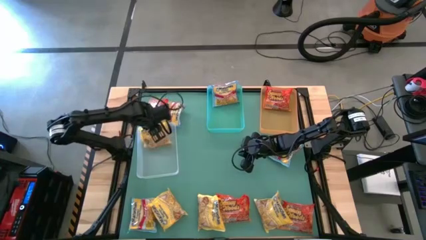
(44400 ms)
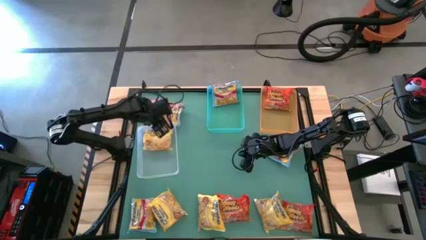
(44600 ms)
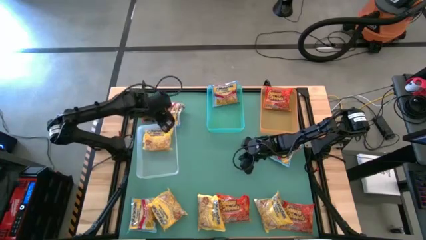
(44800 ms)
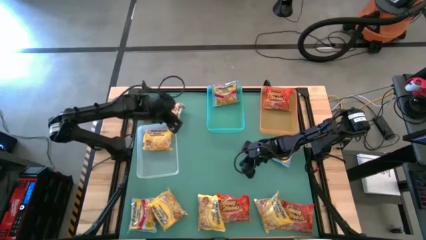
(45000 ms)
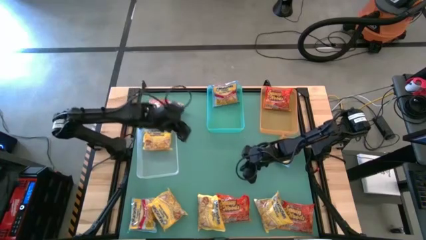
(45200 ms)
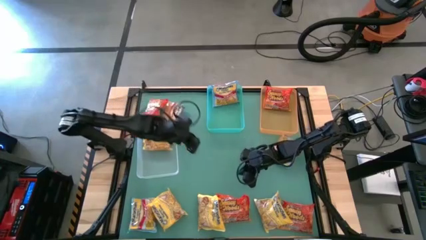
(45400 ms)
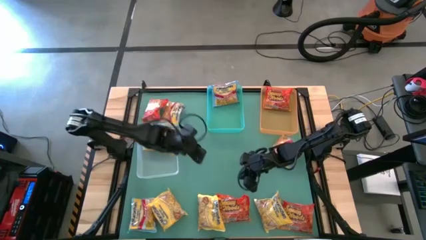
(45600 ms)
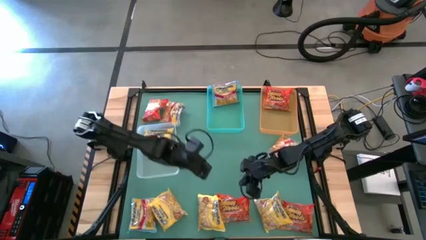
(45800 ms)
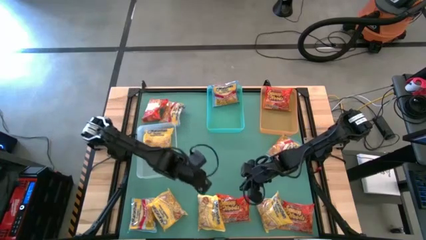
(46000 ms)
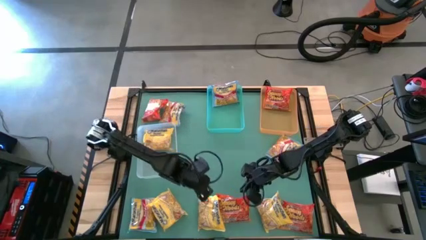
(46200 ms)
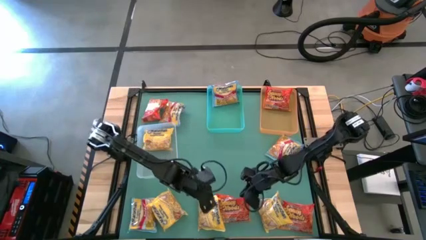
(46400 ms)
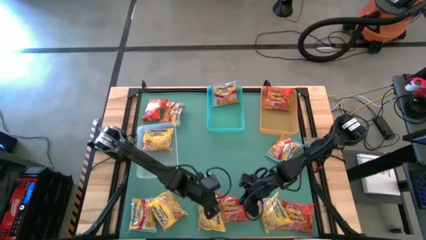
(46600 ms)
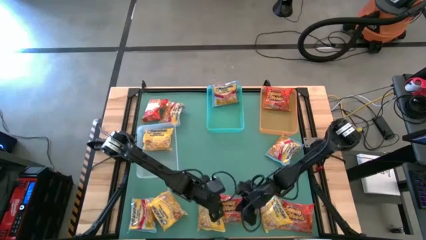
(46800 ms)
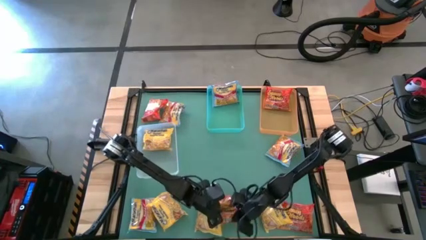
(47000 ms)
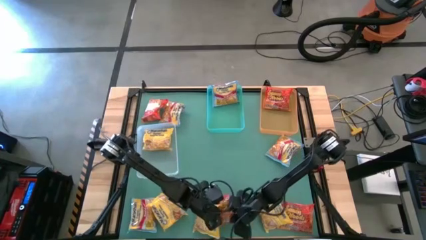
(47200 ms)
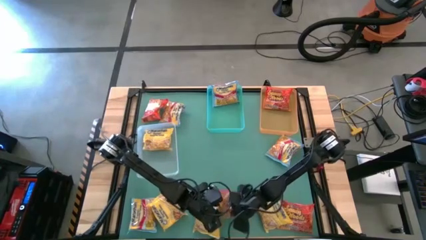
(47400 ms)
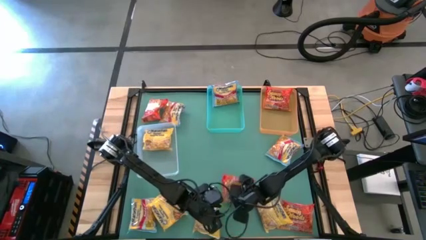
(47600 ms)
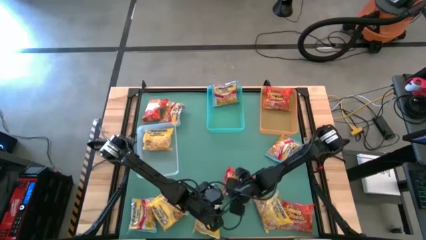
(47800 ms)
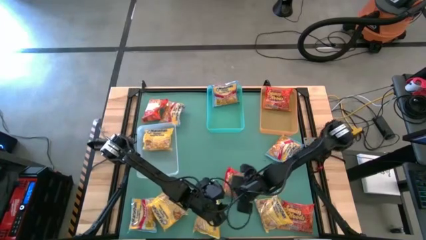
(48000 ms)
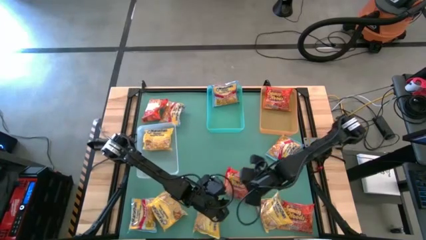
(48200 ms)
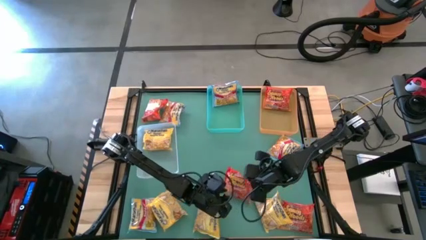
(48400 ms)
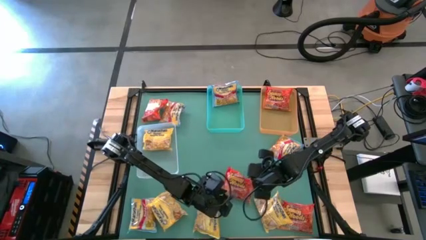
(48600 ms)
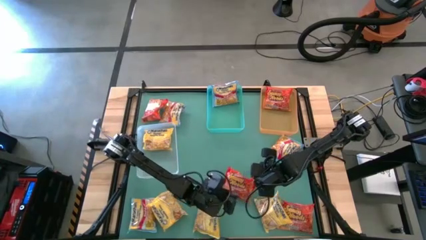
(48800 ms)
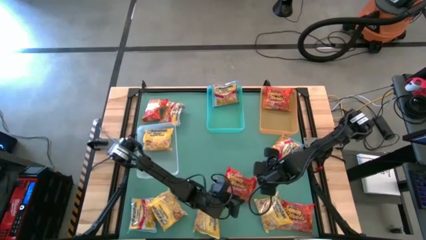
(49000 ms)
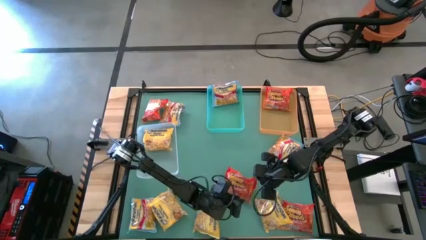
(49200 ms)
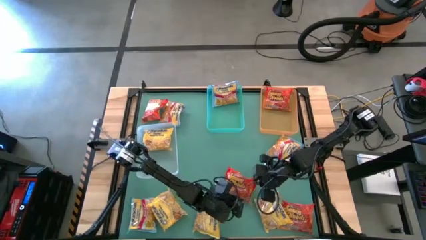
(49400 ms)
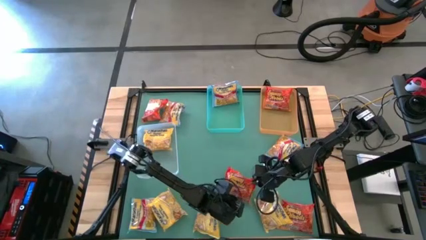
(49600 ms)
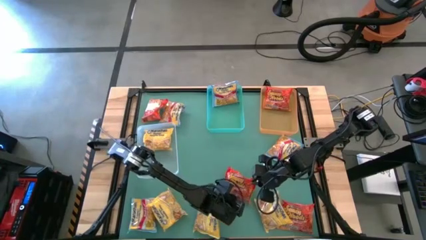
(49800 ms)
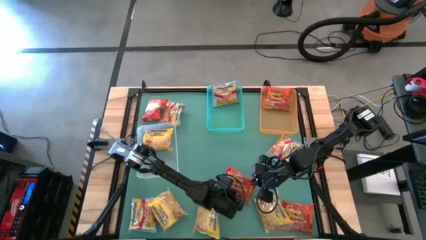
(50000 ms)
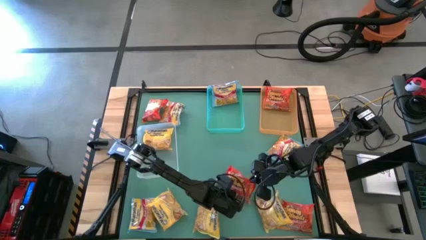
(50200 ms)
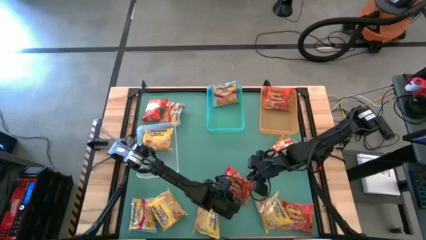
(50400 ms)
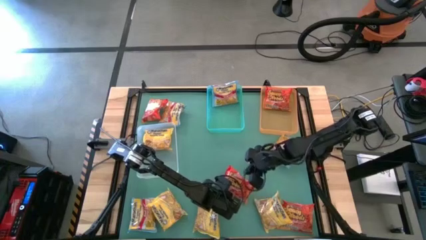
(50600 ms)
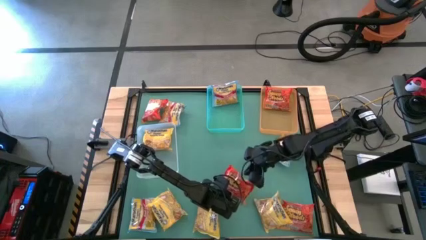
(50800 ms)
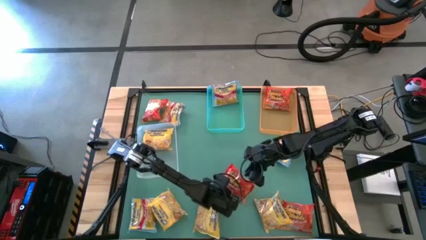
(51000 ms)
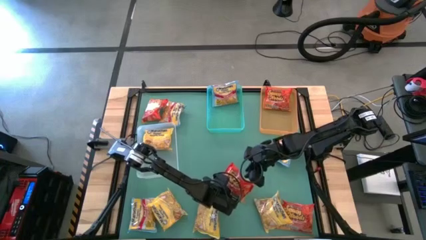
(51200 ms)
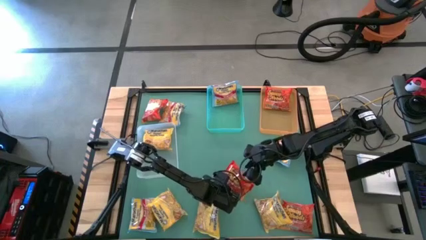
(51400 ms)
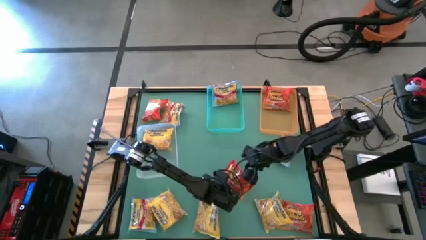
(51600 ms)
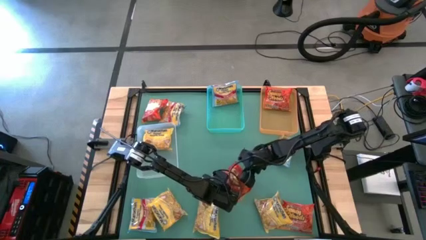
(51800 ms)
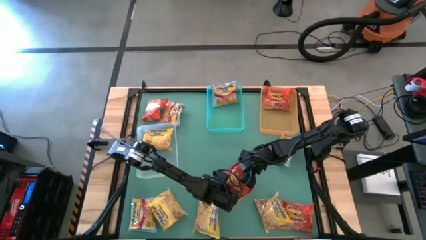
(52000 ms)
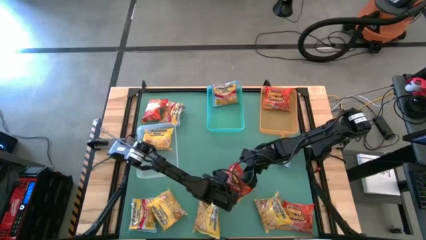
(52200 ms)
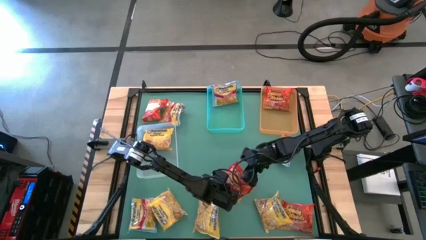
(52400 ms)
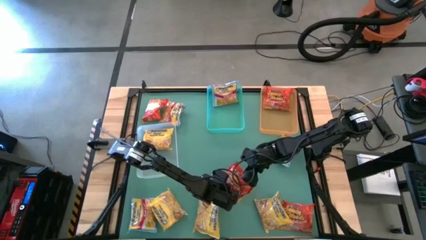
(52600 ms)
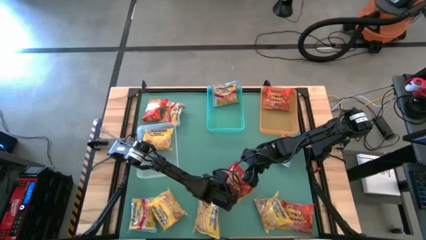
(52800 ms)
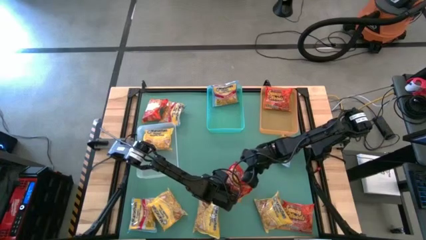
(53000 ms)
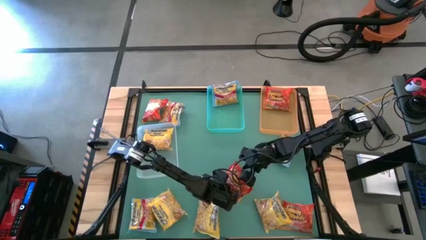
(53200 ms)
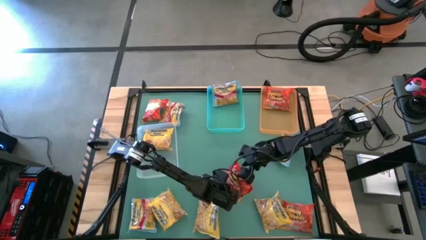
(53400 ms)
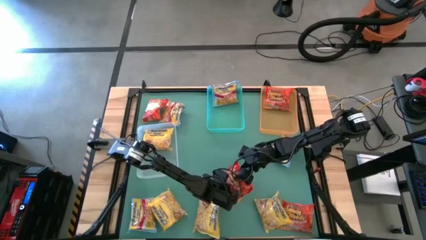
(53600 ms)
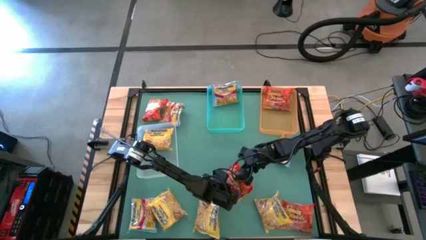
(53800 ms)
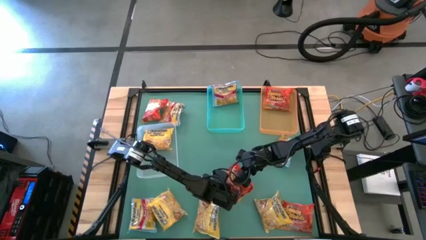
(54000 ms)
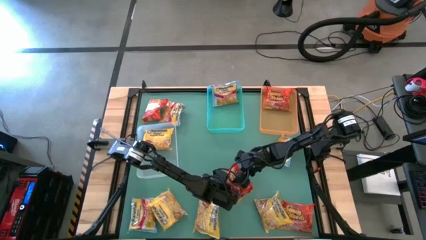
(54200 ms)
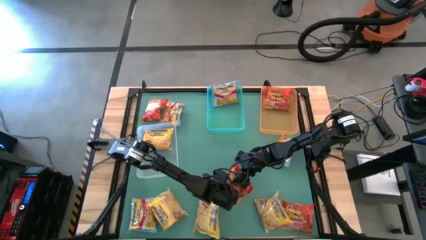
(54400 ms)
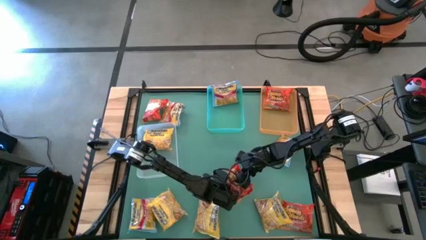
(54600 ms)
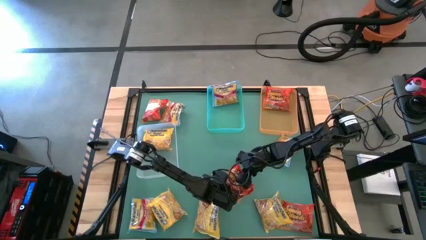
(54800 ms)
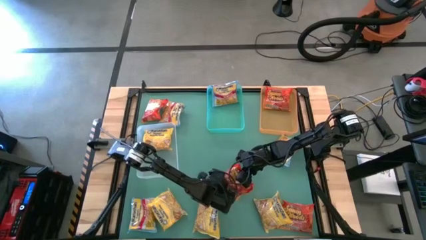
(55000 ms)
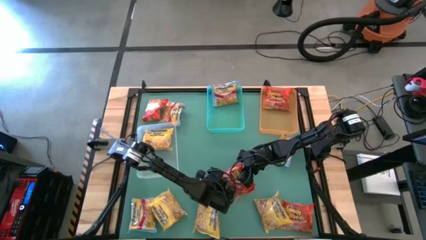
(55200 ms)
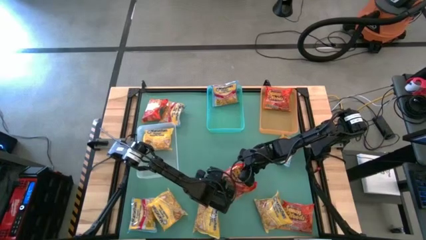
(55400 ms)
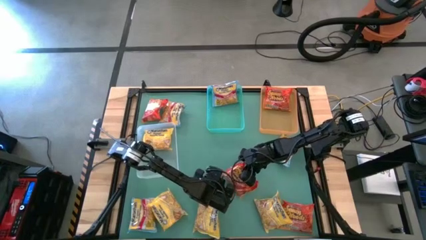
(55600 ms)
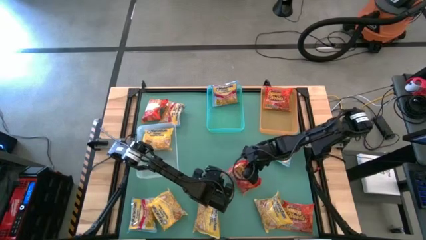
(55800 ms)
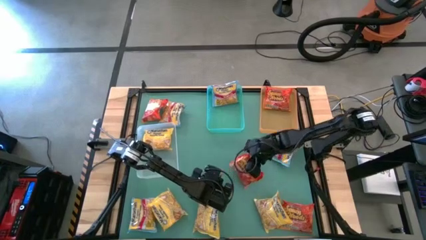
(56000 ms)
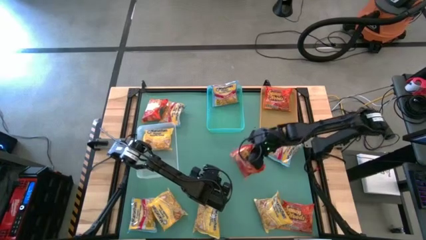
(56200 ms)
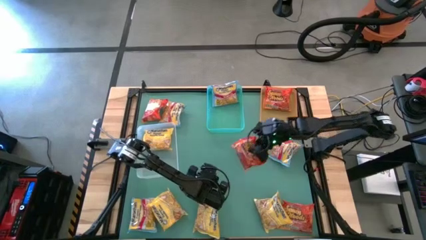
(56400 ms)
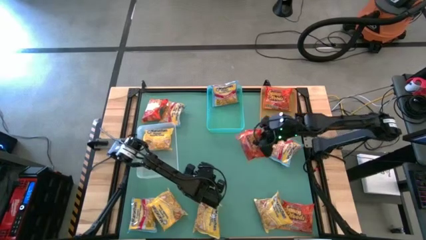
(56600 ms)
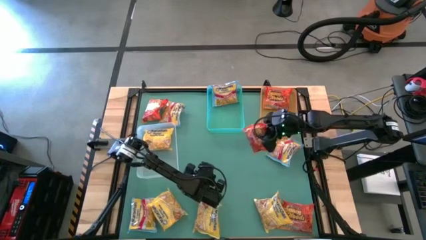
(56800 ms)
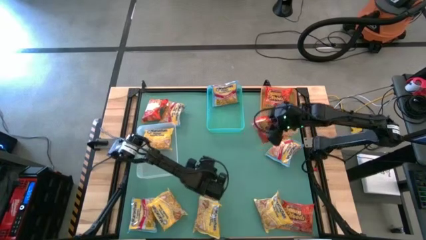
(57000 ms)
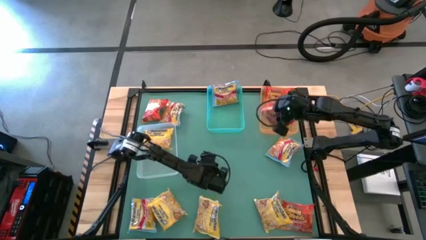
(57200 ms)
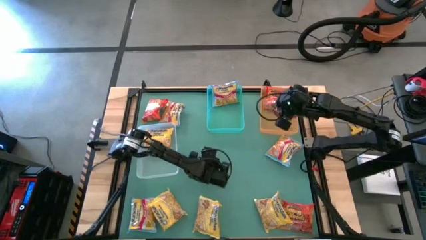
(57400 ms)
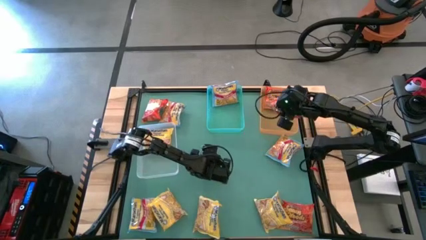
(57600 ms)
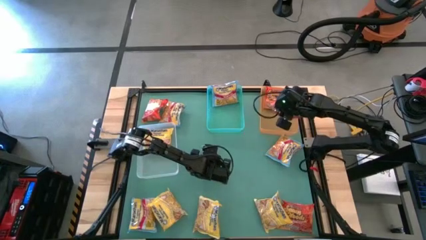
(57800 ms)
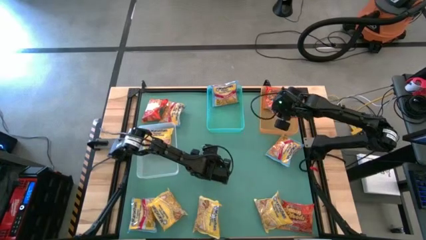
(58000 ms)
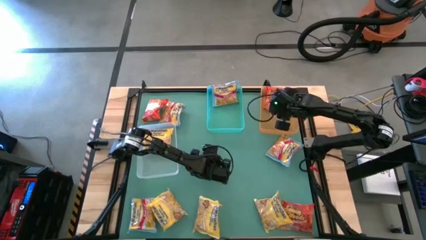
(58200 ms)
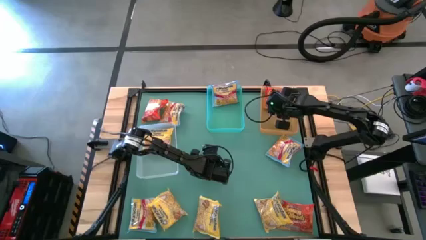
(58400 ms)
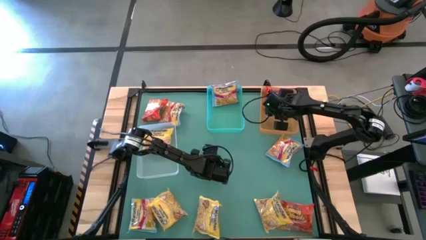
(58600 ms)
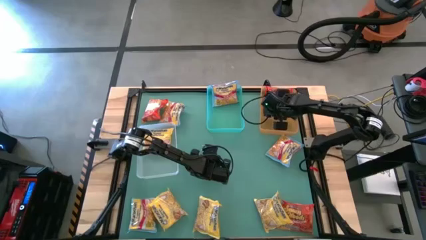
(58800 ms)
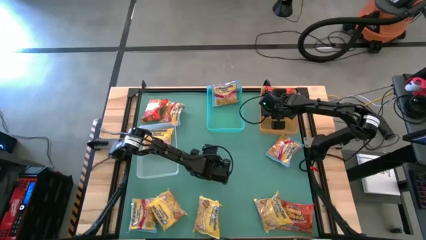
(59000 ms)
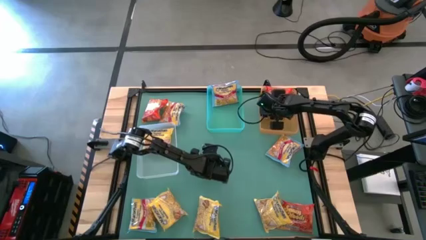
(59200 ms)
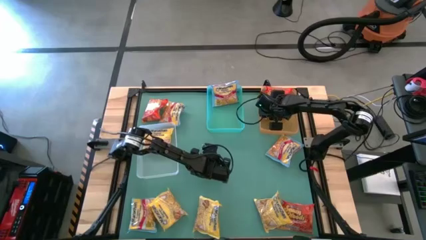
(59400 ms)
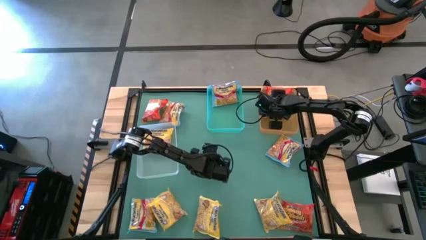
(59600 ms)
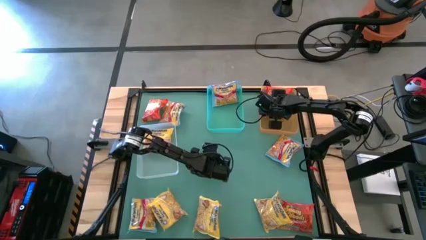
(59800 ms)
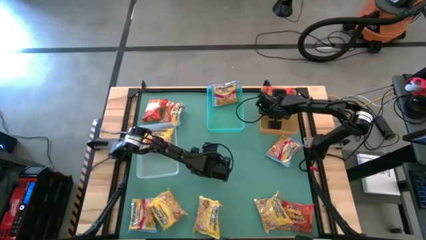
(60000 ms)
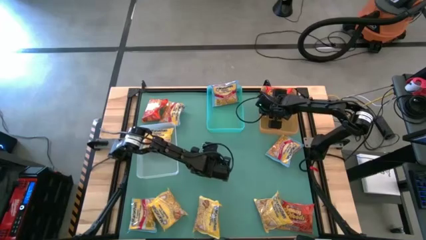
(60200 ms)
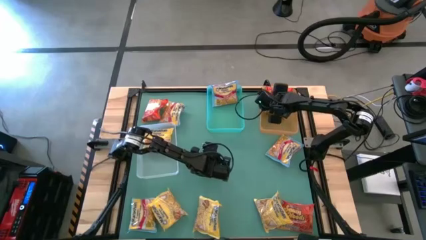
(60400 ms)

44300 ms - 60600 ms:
Task: Sort Maruchan noodles
Put the bottom left orange noodle pack into the orange bin
